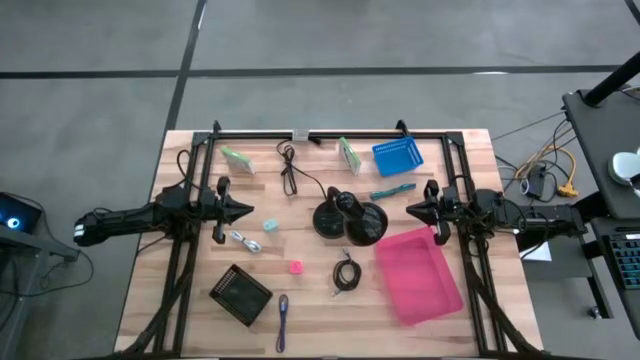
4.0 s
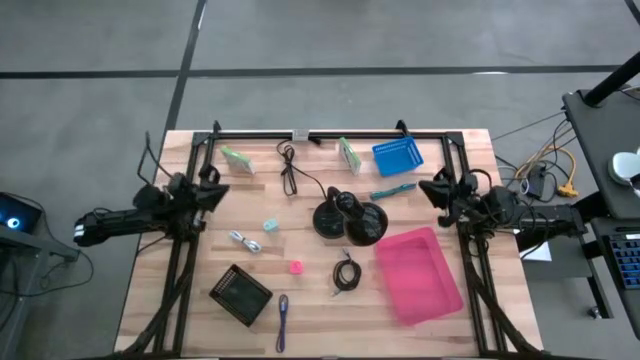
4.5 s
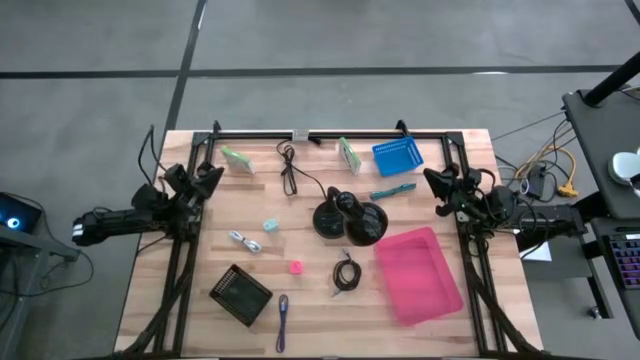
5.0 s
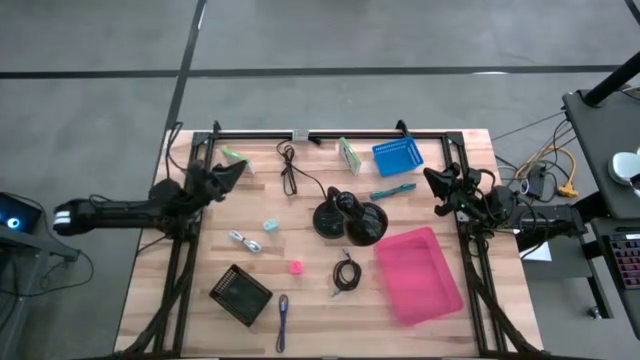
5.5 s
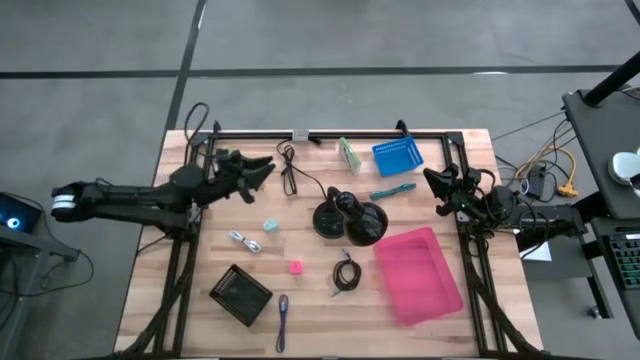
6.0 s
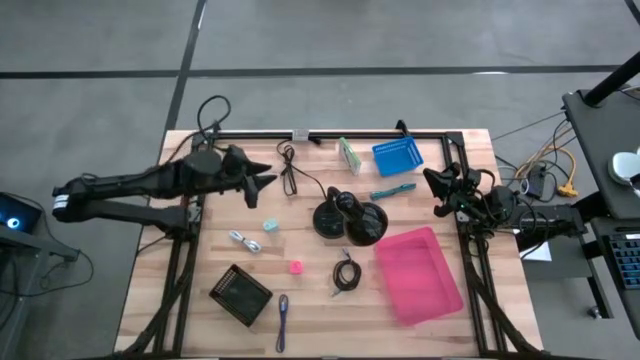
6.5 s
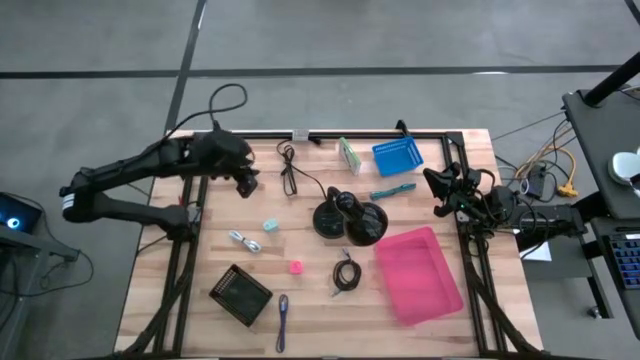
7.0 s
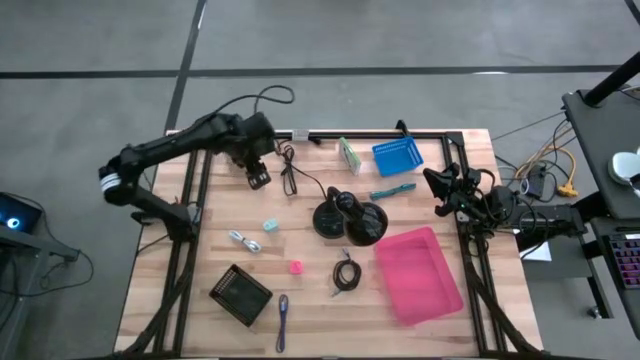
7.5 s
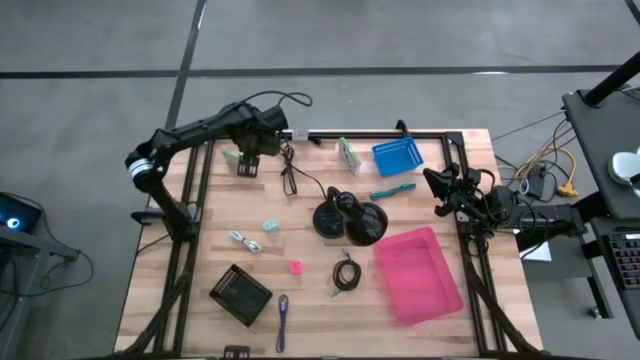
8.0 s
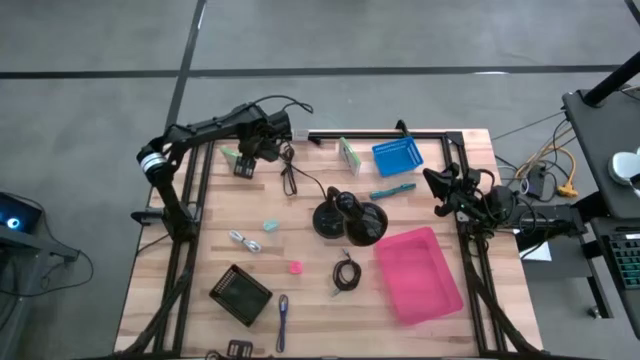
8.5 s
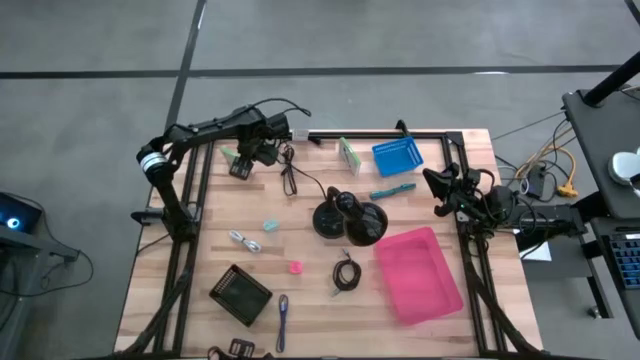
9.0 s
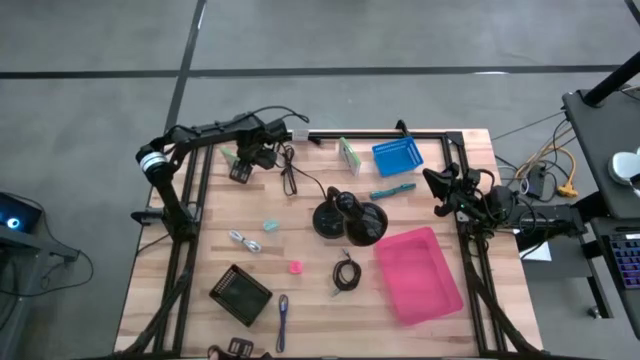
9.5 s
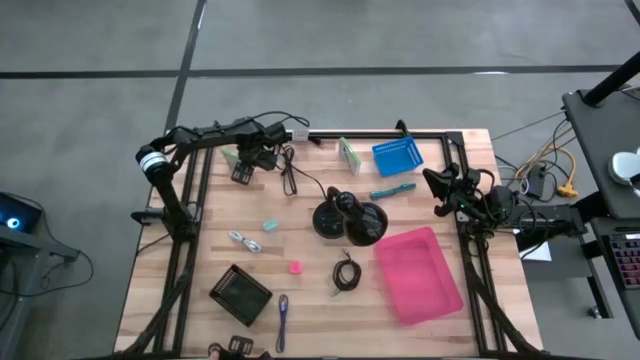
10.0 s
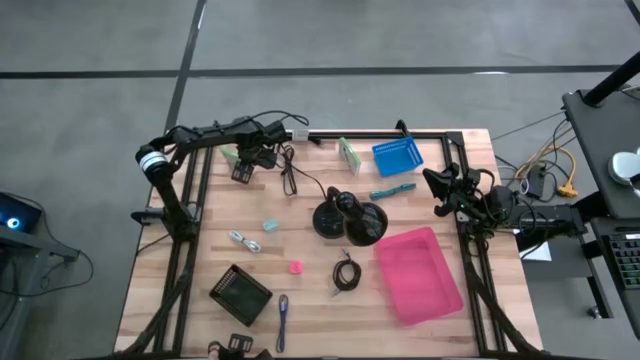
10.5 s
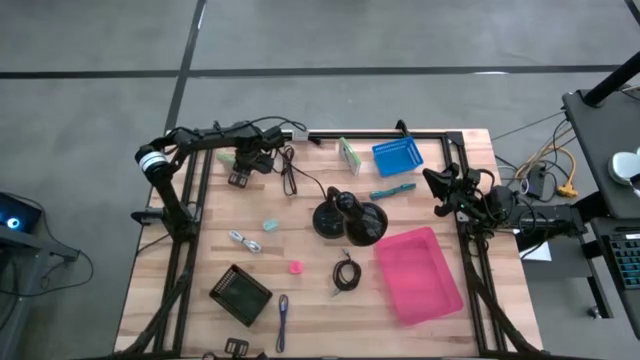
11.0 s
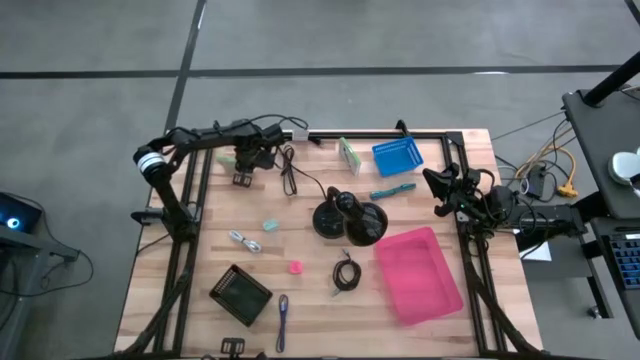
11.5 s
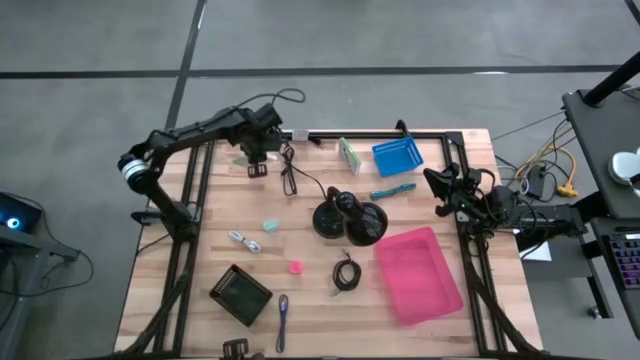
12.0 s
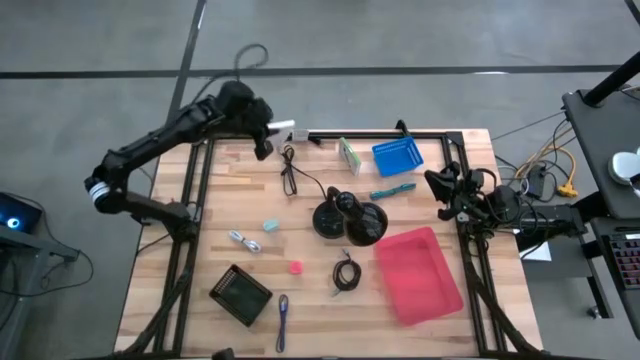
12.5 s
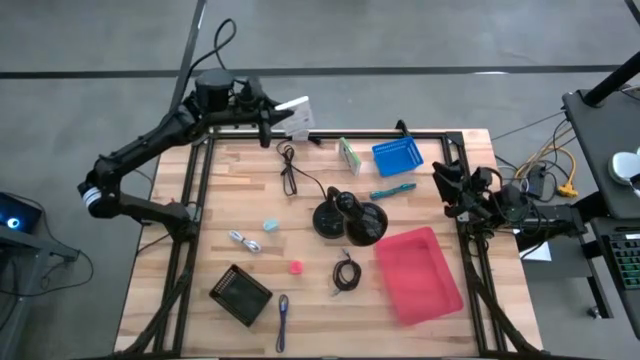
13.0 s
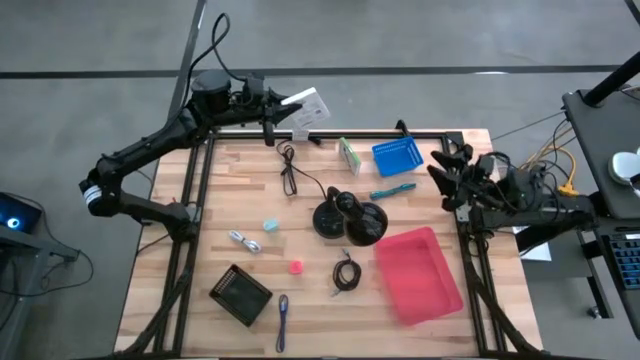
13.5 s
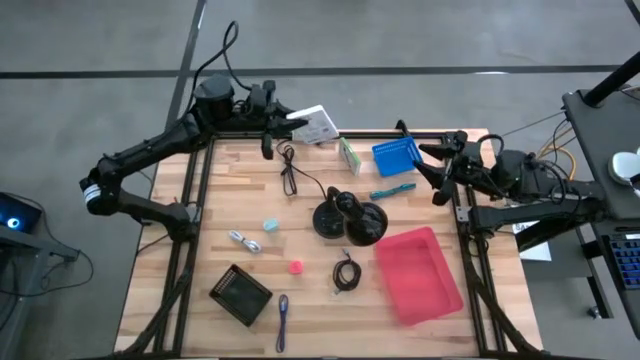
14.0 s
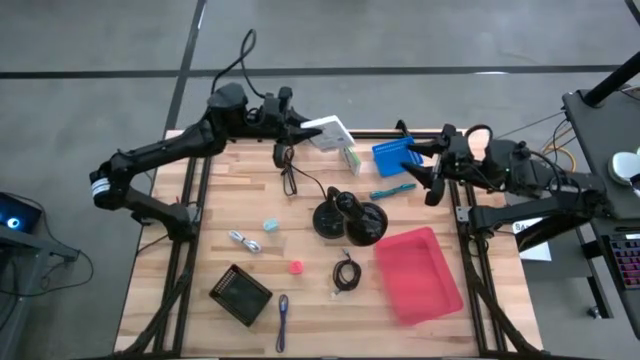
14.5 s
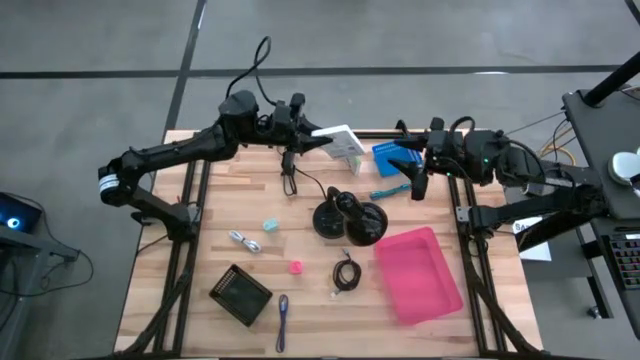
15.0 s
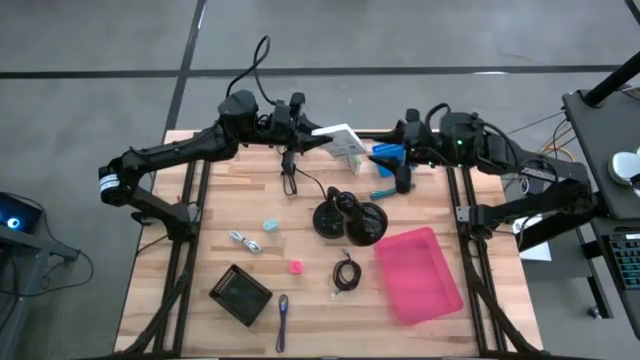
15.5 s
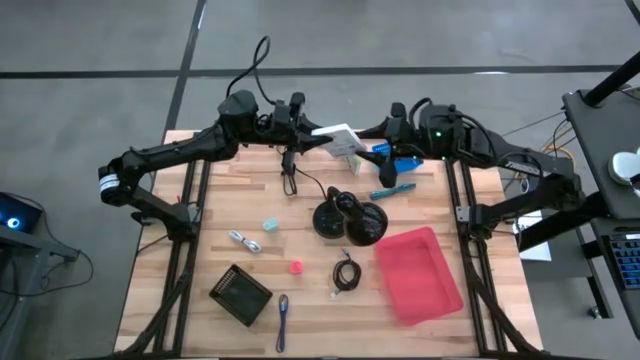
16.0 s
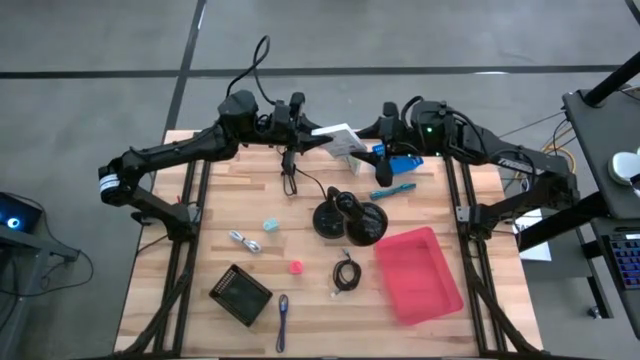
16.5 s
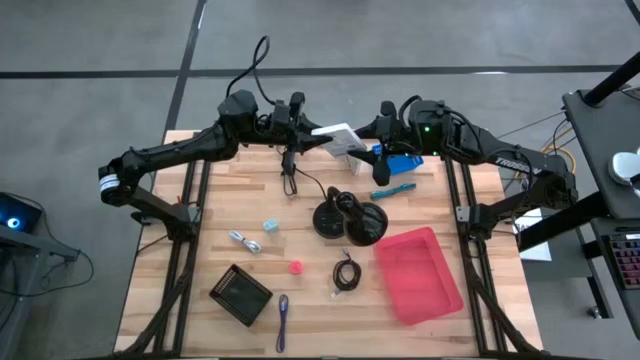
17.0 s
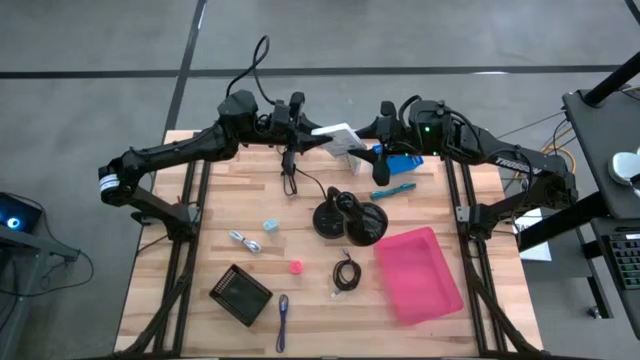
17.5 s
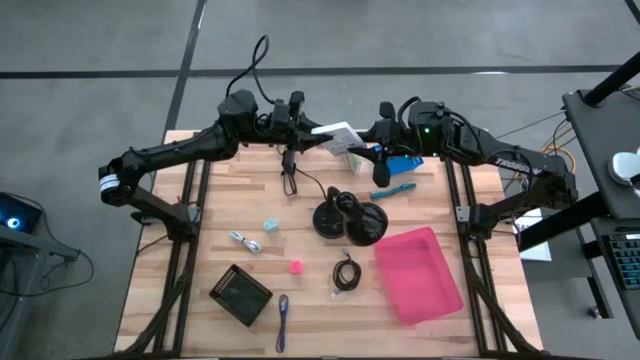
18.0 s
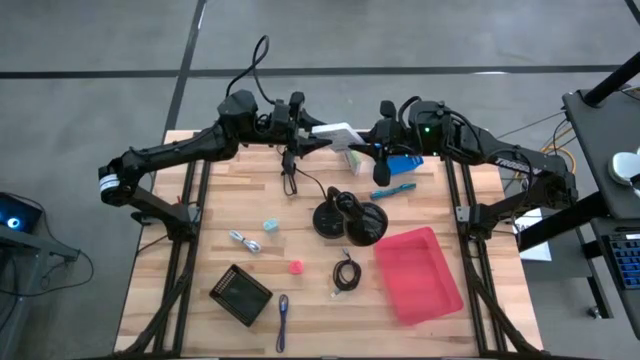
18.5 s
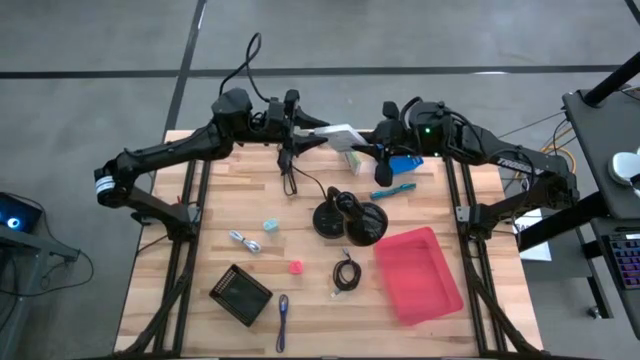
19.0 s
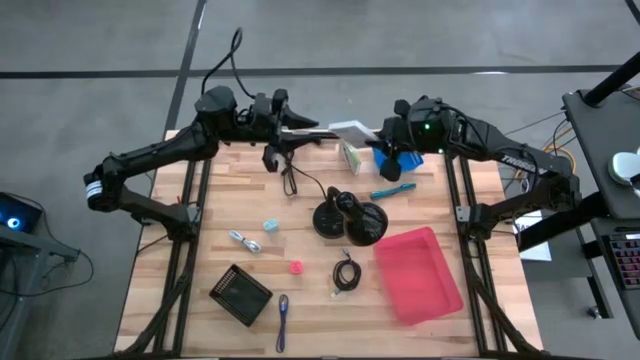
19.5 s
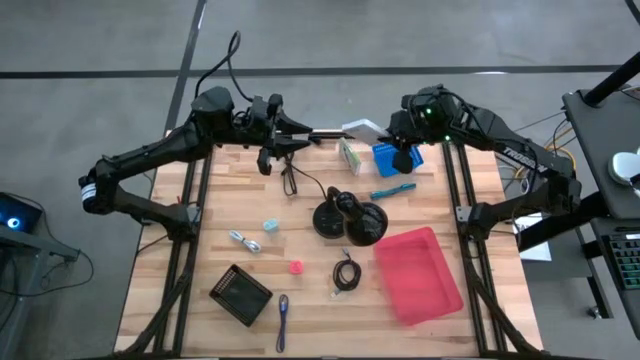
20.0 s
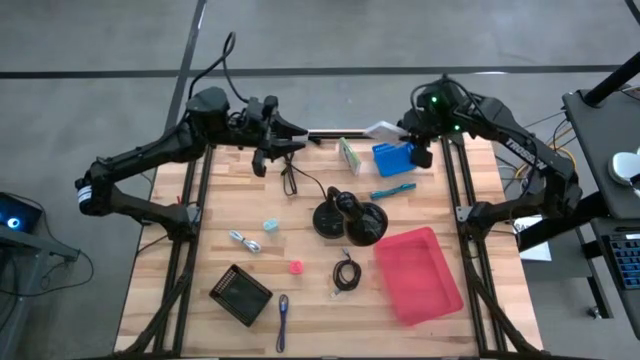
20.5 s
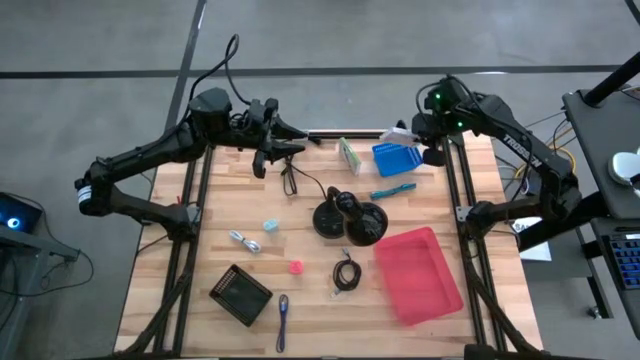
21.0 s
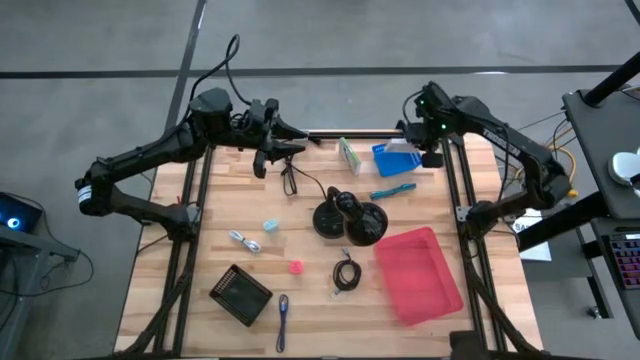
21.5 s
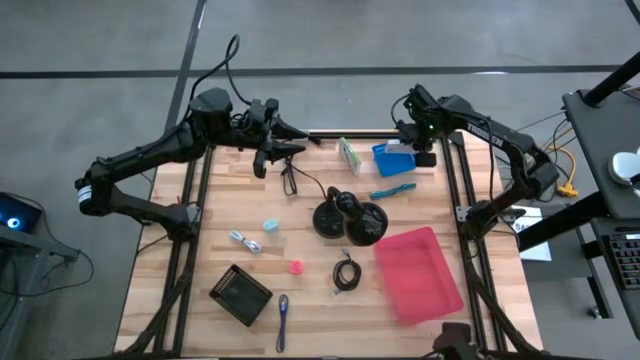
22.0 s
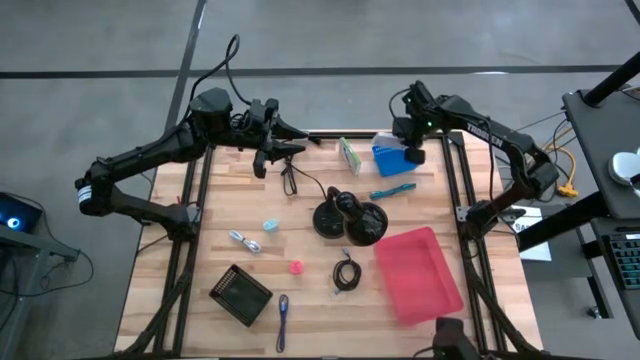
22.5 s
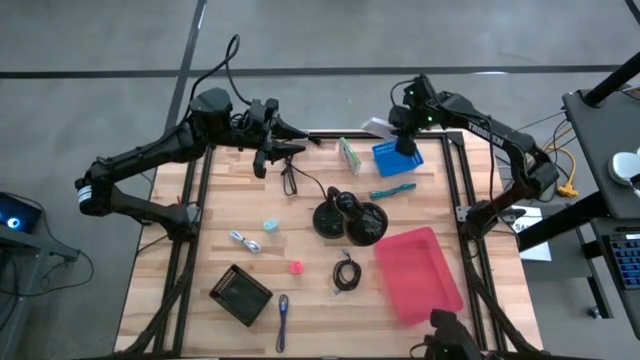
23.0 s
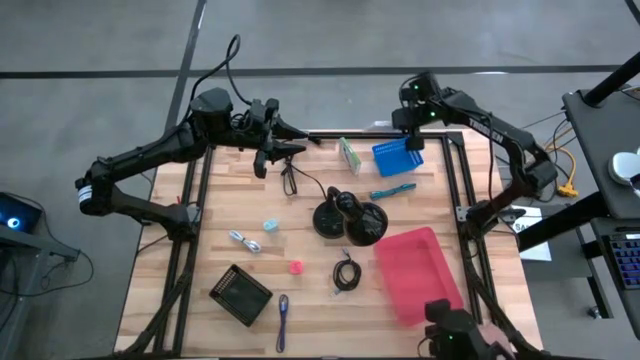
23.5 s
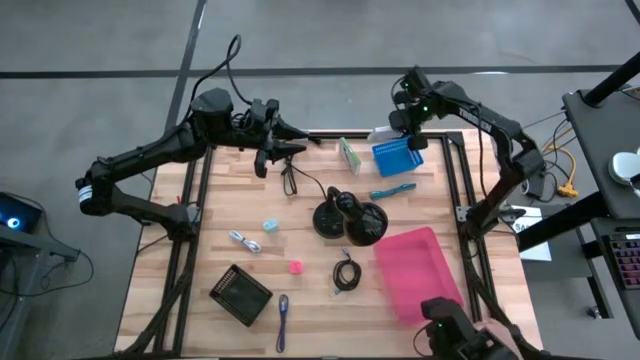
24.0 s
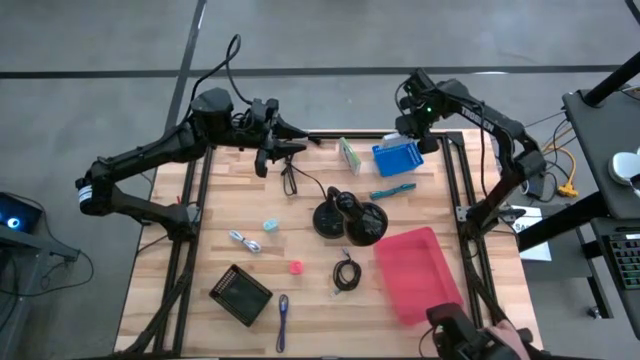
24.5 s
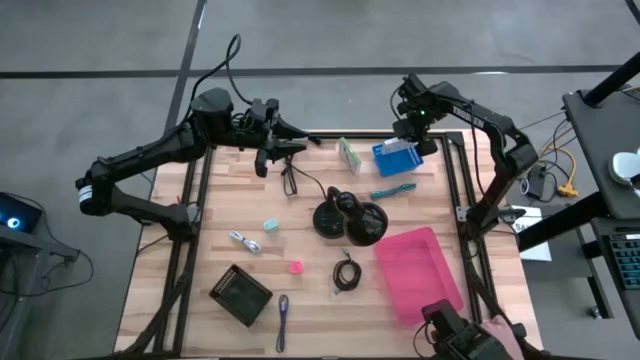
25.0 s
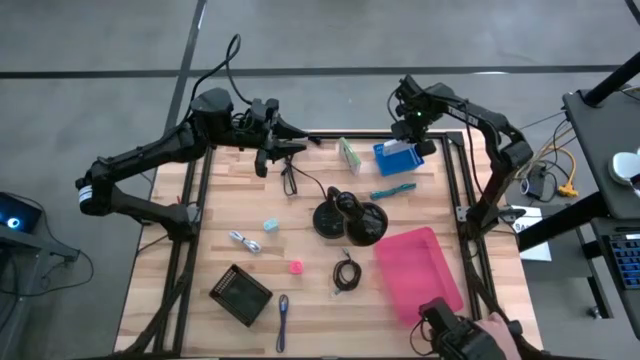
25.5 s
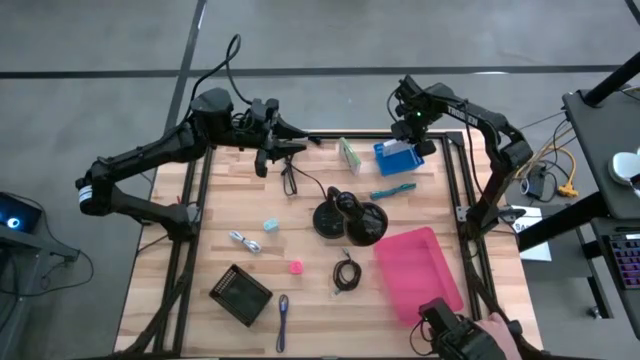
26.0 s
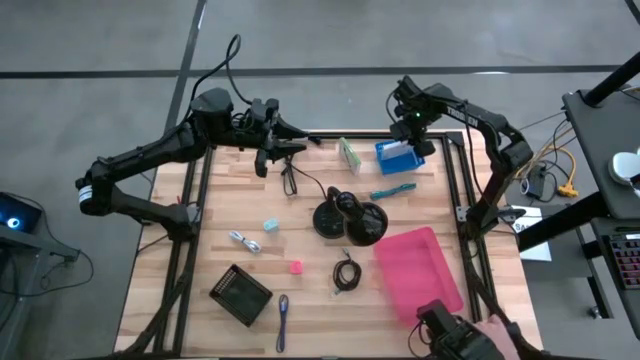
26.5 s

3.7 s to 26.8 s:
Task: Pick and place items into bin
Put the left white card reader box into the blue bin
